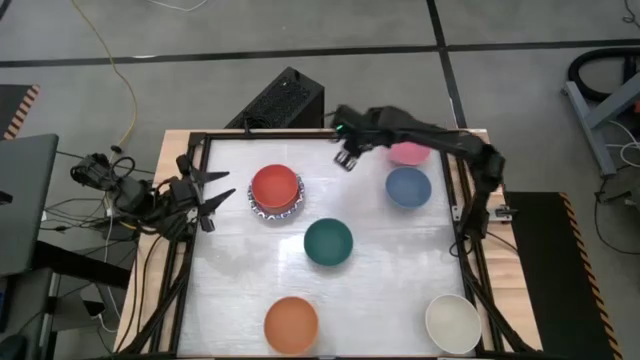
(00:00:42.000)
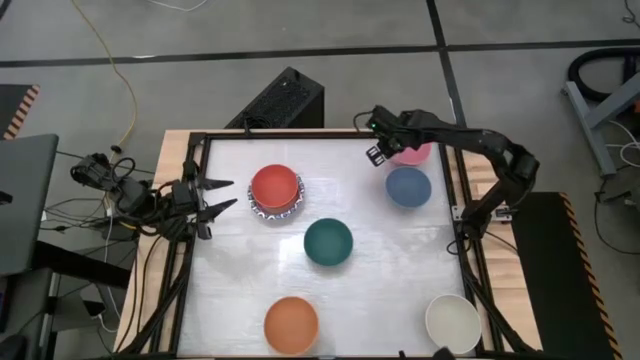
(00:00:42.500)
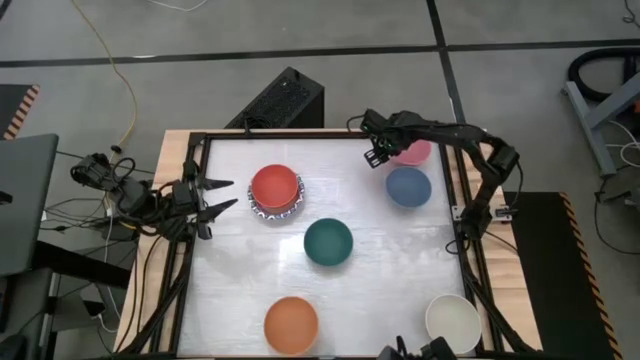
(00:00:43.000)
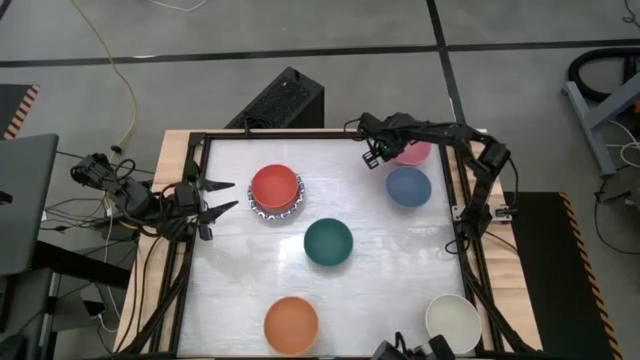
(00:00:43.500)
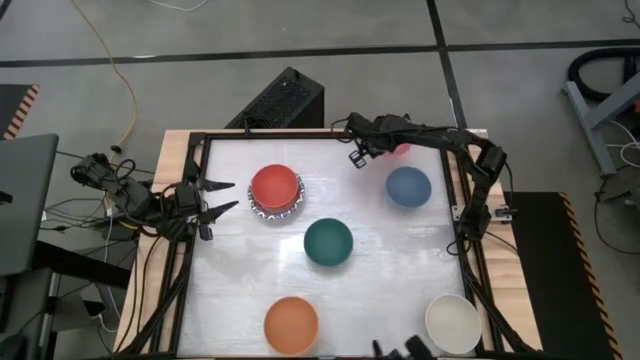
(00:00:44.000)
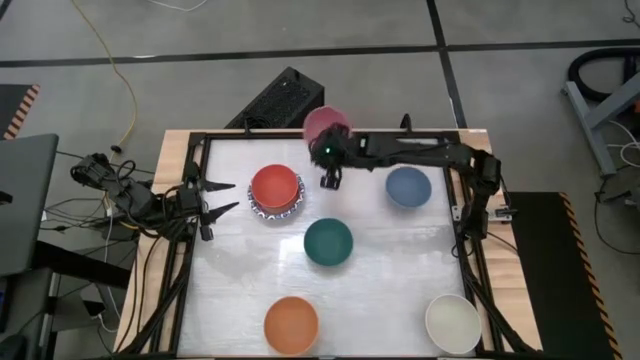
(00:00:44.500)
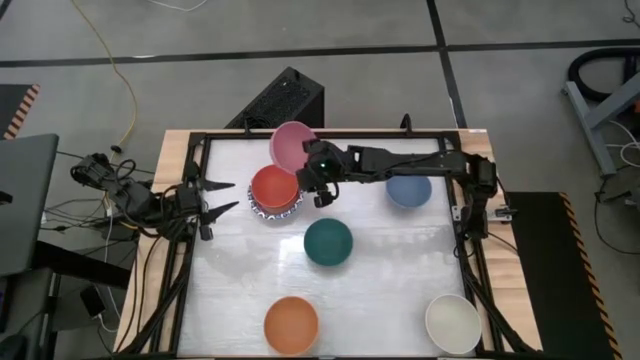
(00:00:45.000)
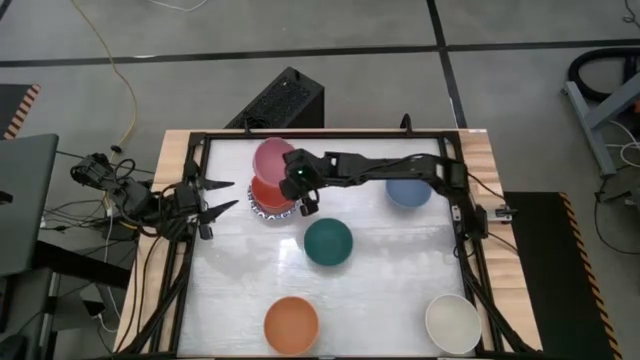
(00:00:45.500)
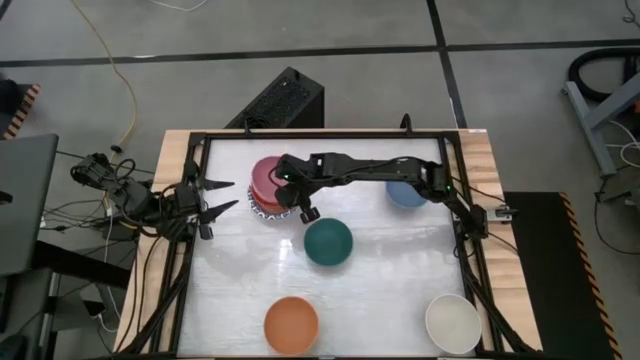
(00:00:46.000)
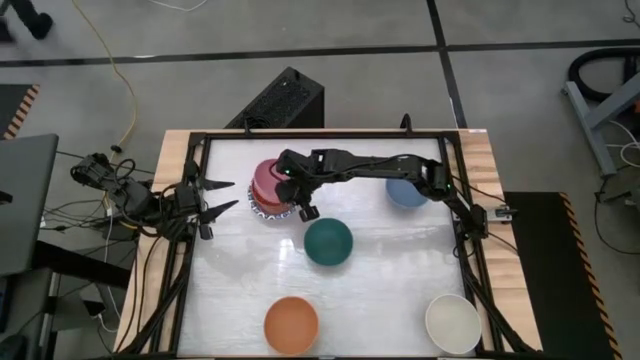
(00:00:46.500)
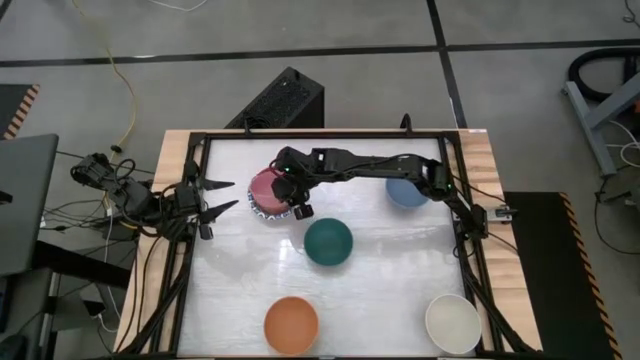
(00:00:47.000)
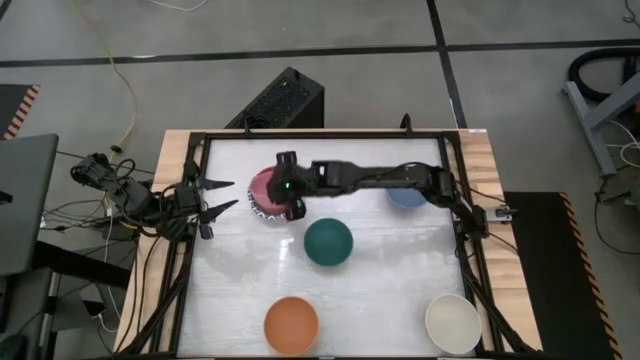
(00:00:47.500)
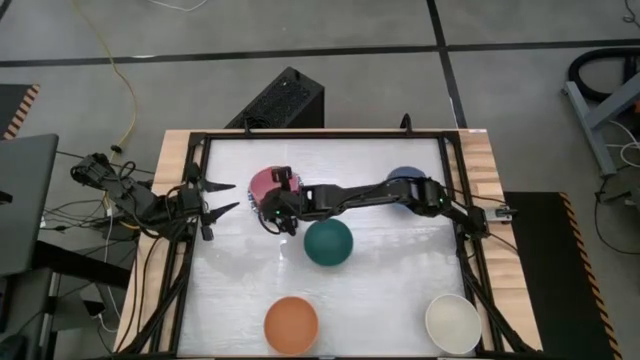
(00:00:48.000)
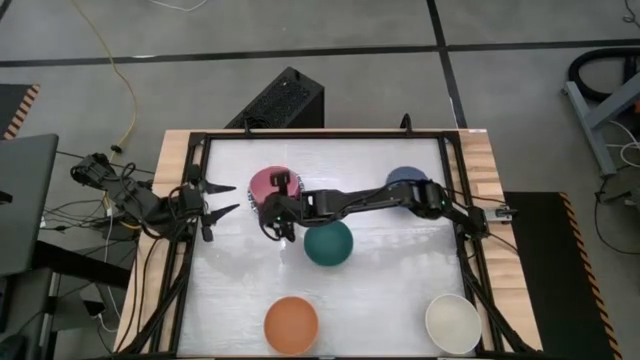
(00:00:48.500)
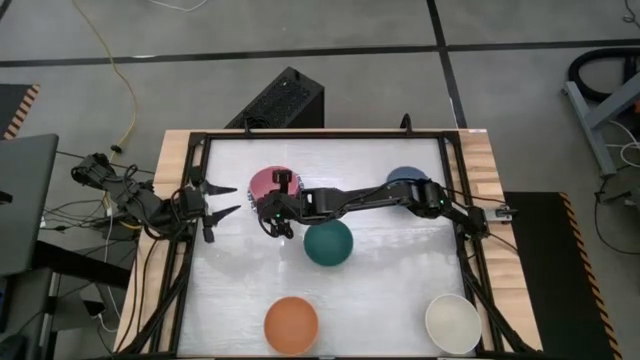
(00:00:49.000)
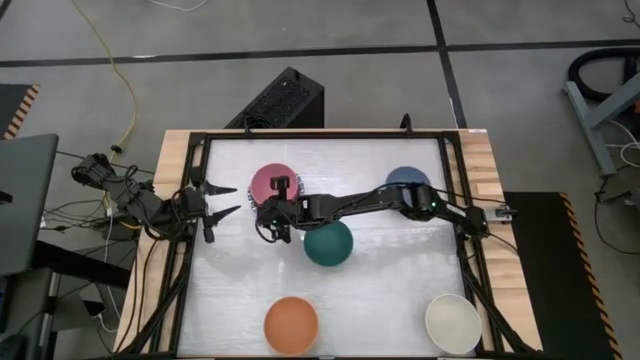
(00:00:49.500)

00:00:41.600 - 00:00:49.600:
Stack the pink bowl on top of the orange bowl

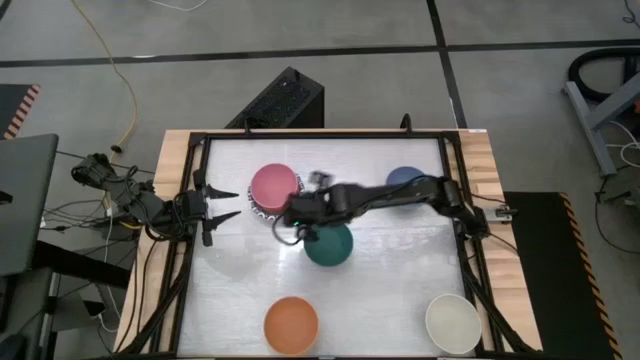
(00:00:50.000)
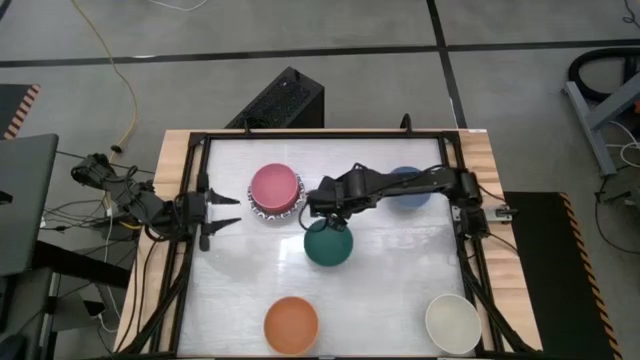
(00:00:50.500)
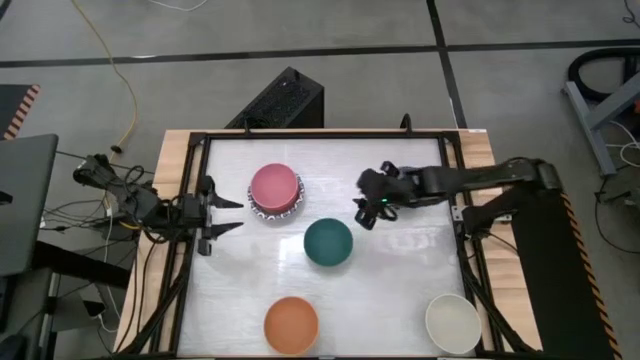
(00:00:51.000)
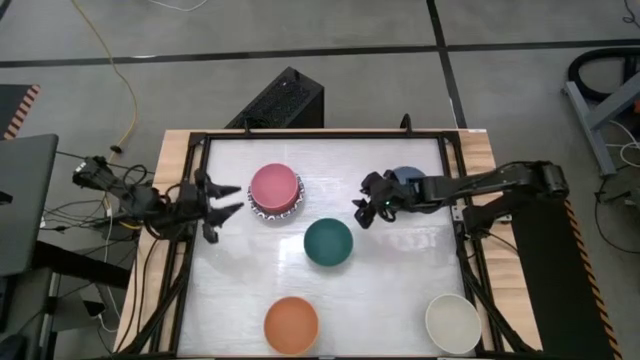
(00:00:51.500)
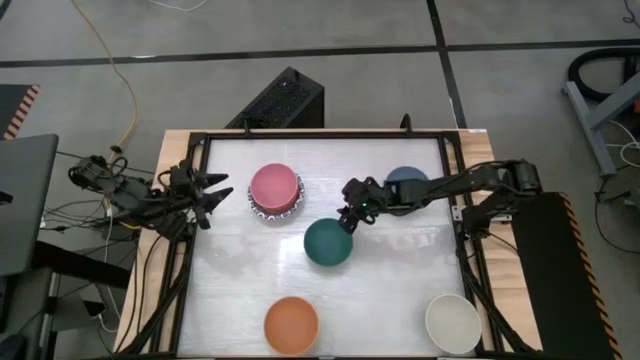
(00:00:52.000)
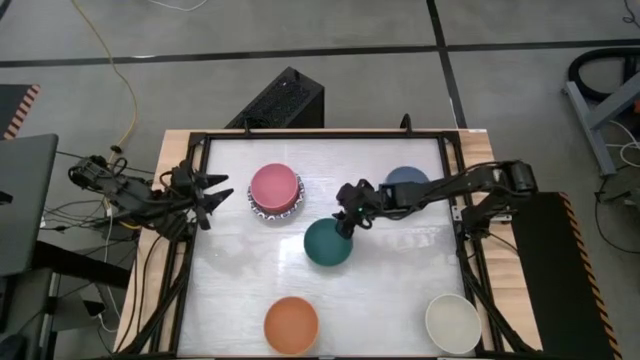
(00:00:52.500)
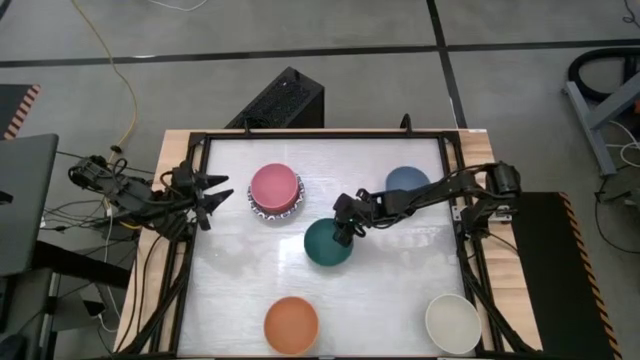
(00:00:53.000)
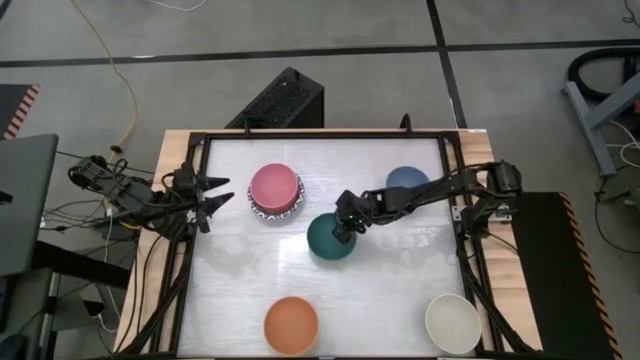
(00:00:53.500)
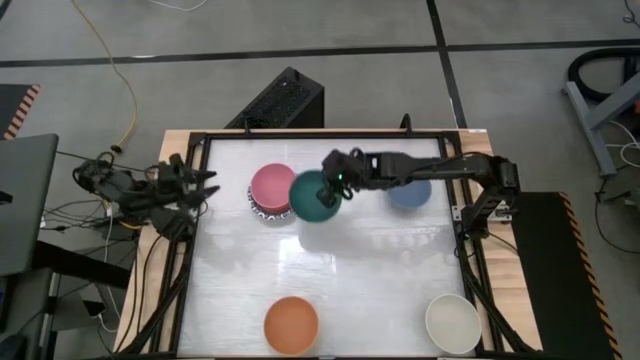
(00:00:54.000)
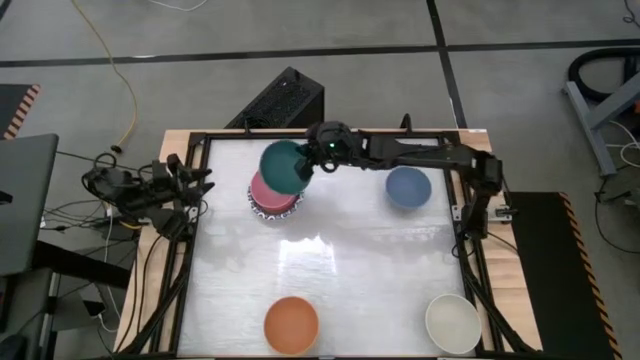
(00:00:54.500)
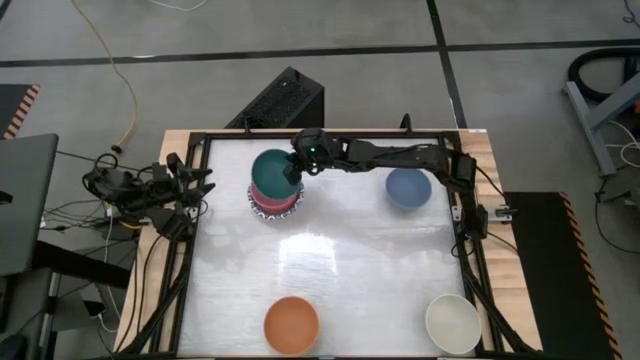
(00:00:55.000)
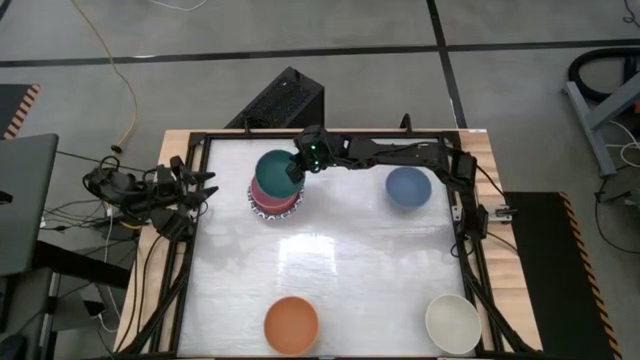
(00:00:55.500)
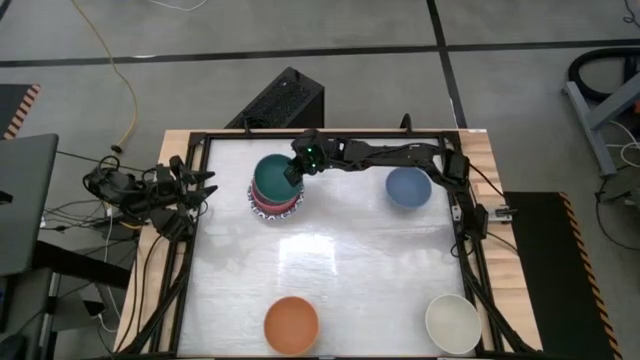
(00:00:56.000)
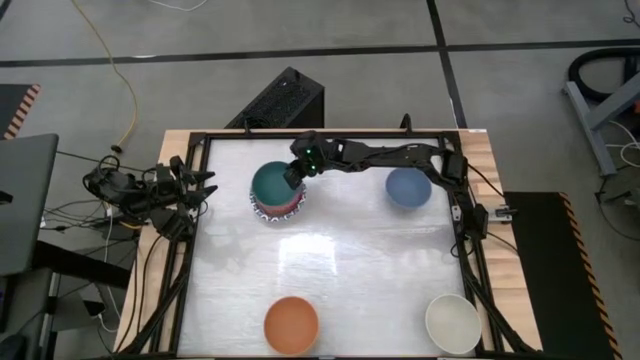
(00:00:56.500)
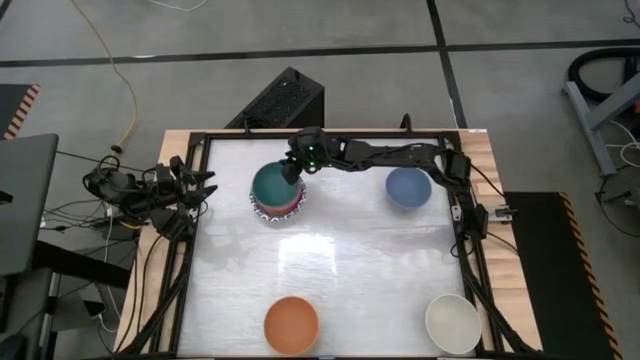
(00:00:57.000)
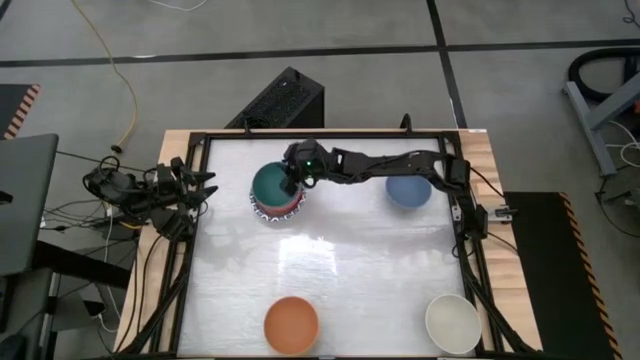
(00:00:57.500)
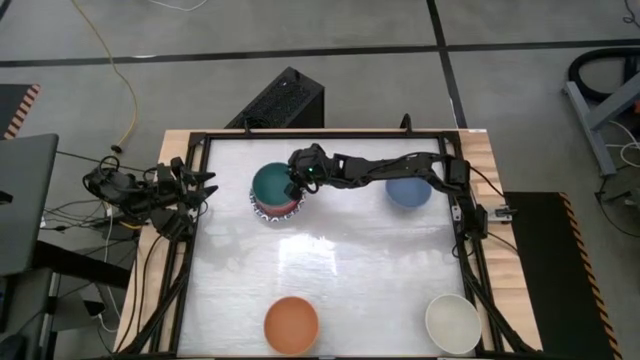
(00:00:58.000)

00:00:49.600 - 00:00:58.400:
Stack the green bowl on top of the pink bowl

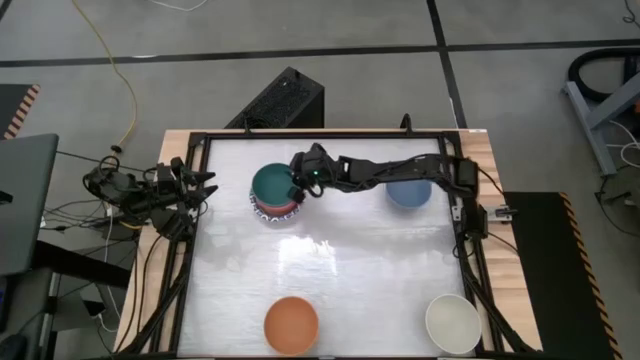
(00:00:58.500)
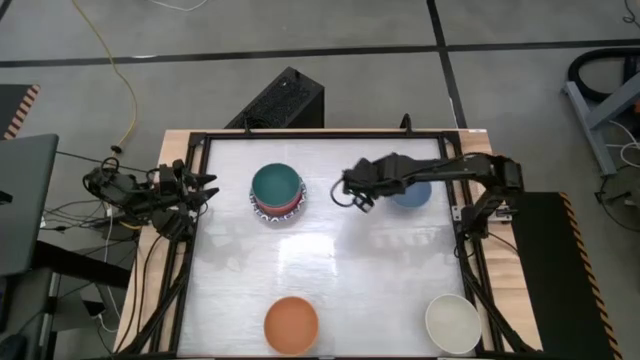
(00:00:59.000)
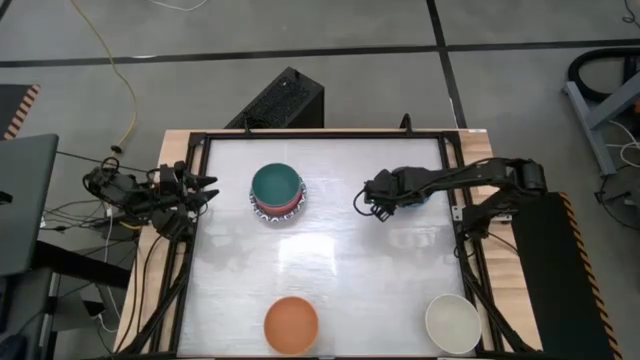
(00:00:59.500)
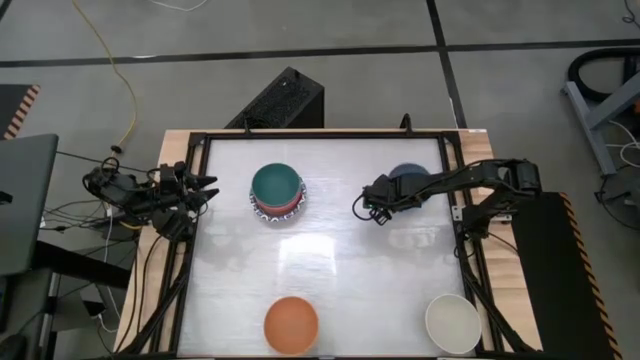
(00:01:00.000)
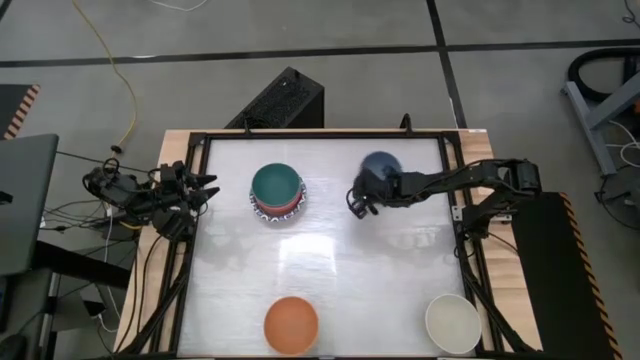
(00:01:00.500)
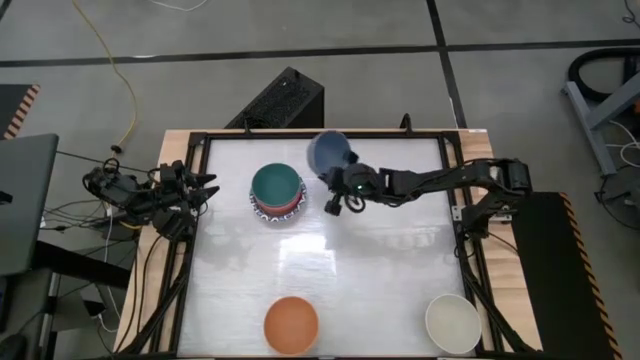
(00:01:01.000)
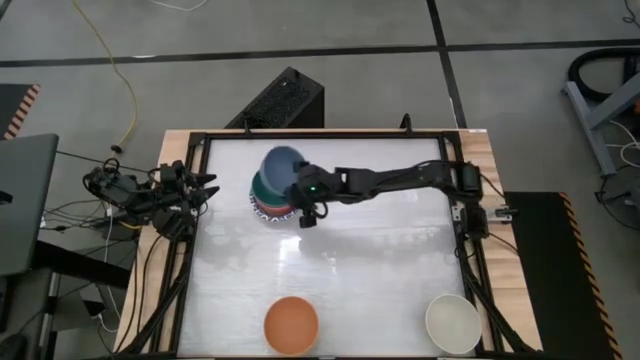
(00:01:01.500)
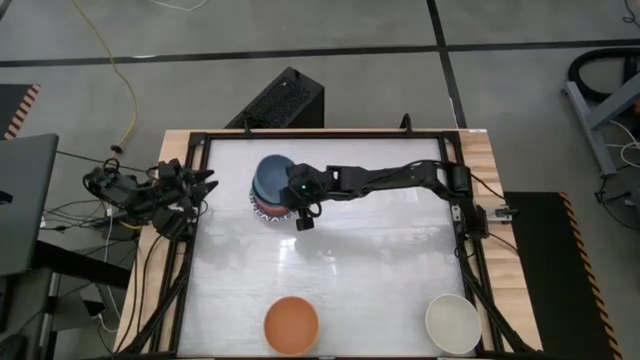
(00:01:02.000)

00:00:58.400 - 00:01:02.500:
Stack the blue bowl on top of the green bowl
